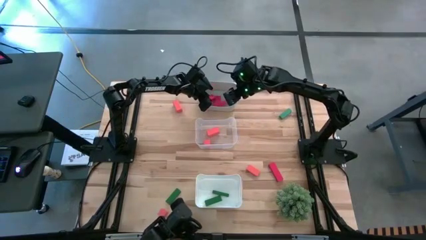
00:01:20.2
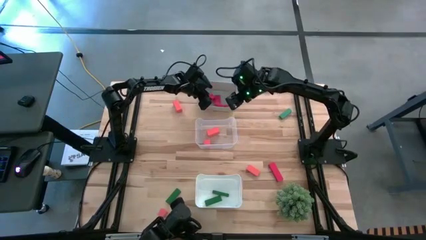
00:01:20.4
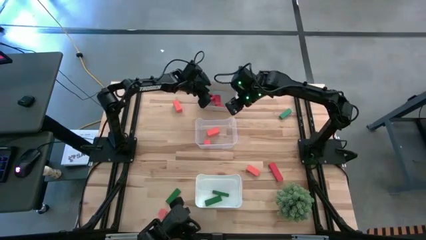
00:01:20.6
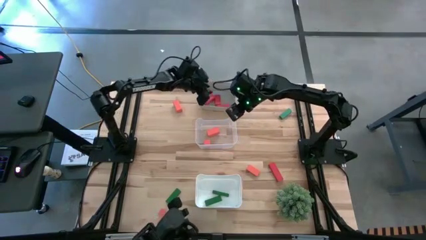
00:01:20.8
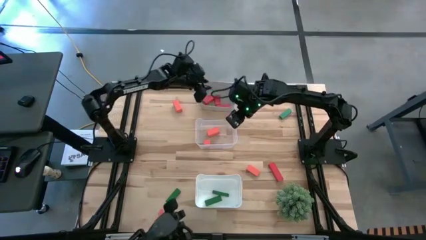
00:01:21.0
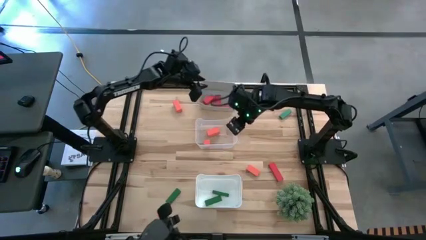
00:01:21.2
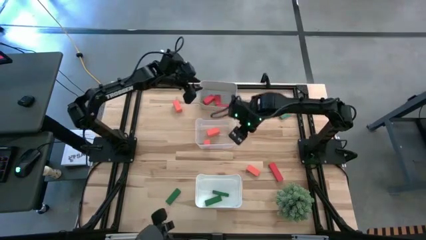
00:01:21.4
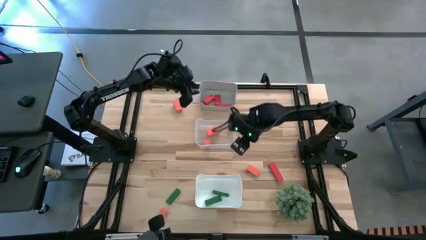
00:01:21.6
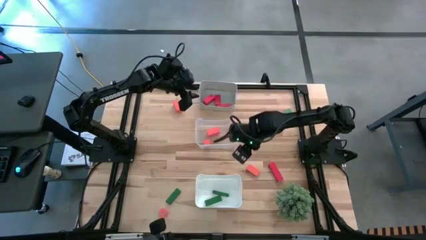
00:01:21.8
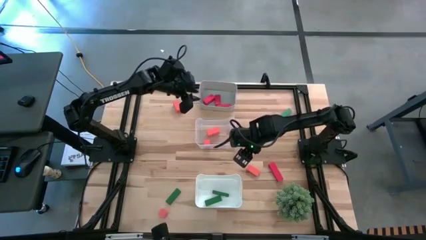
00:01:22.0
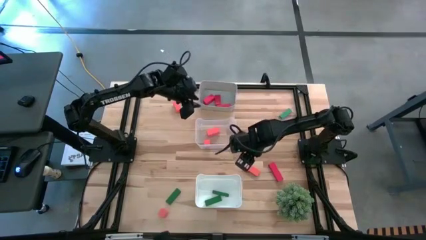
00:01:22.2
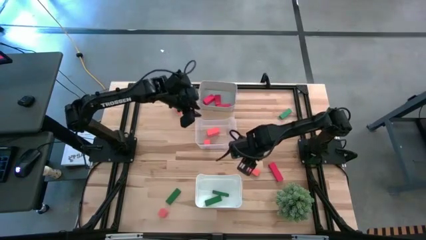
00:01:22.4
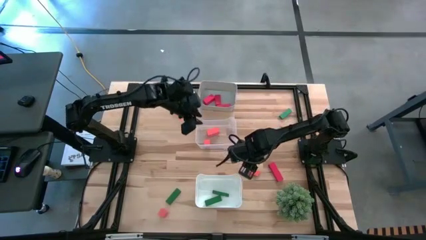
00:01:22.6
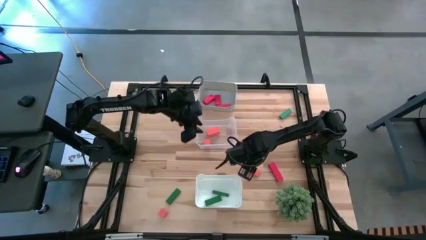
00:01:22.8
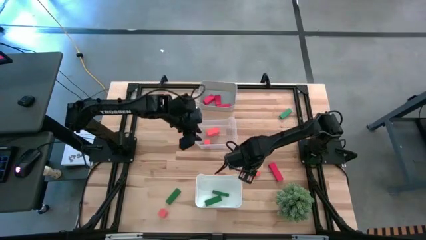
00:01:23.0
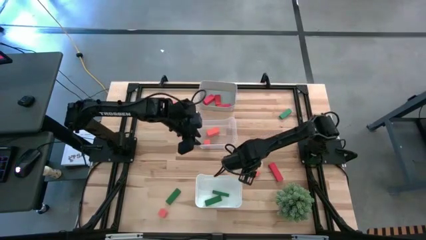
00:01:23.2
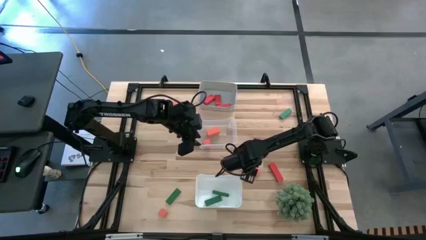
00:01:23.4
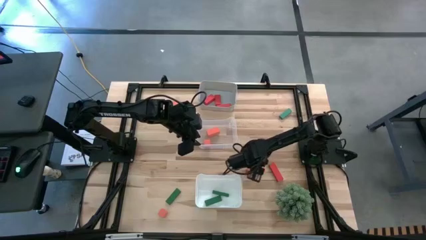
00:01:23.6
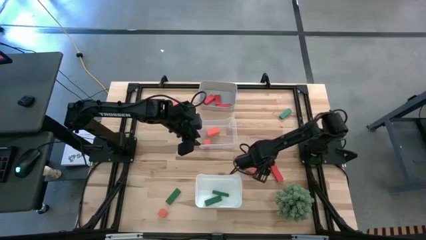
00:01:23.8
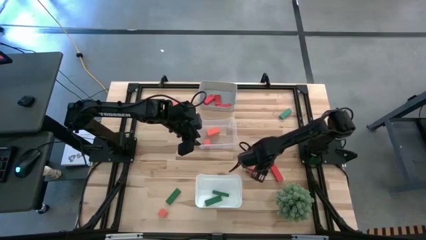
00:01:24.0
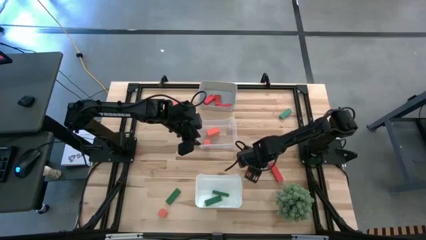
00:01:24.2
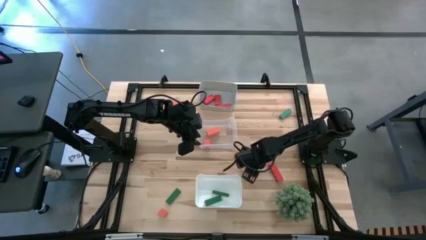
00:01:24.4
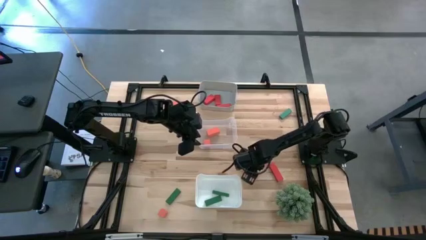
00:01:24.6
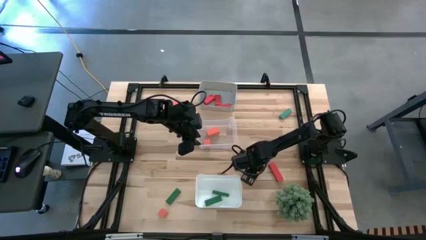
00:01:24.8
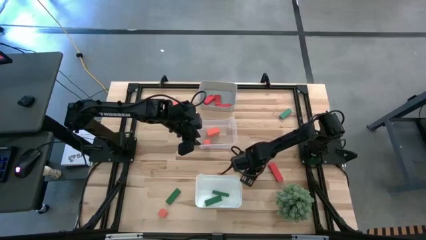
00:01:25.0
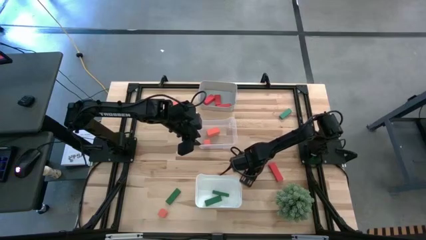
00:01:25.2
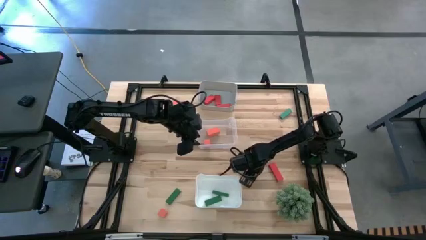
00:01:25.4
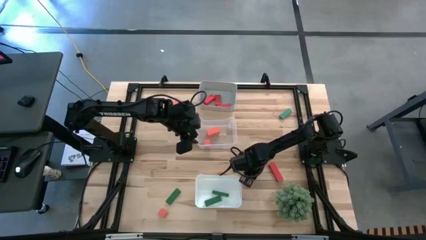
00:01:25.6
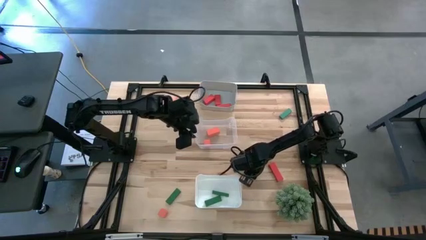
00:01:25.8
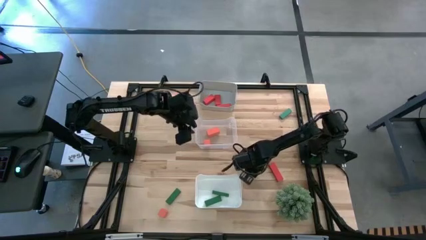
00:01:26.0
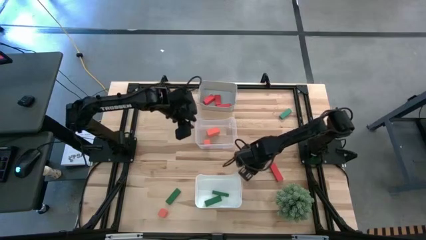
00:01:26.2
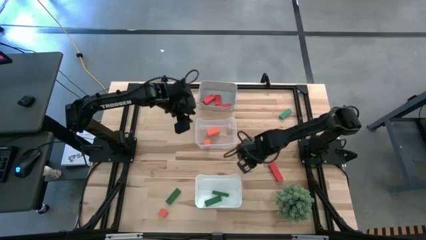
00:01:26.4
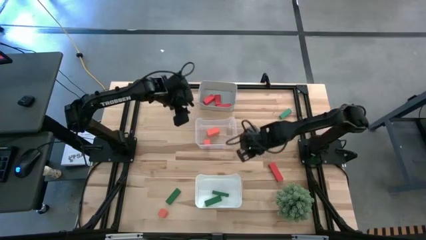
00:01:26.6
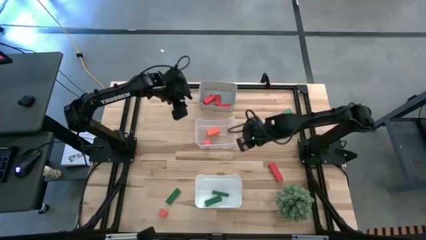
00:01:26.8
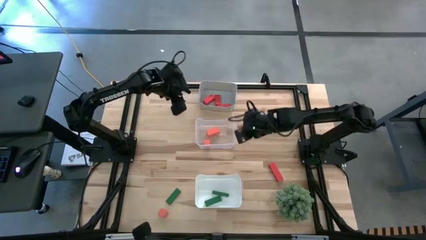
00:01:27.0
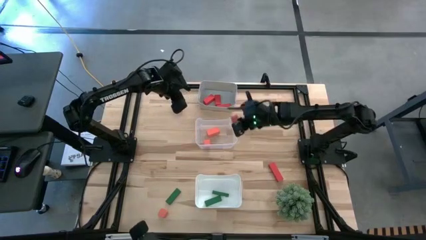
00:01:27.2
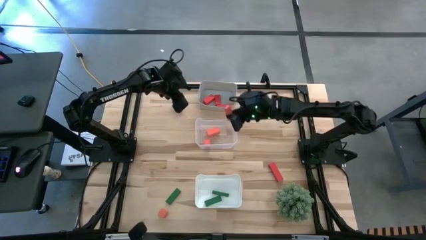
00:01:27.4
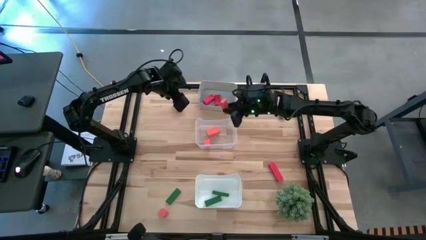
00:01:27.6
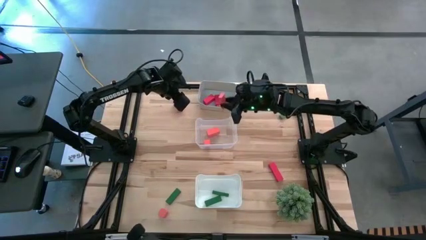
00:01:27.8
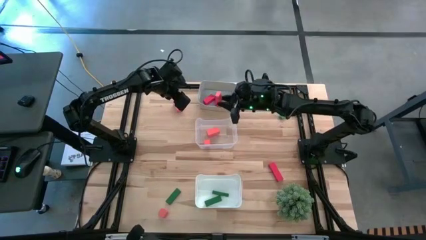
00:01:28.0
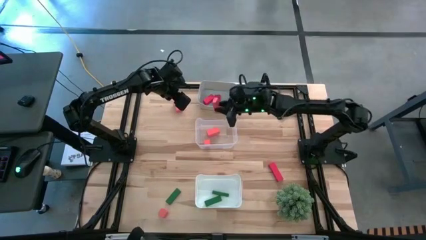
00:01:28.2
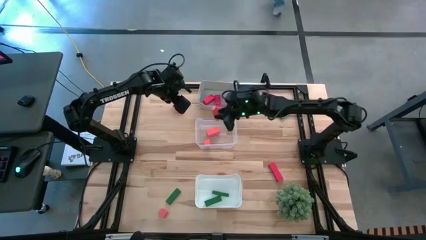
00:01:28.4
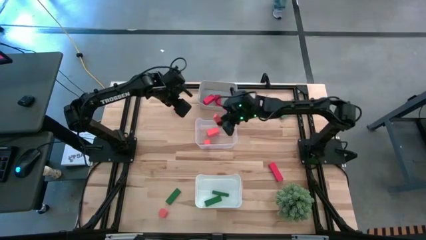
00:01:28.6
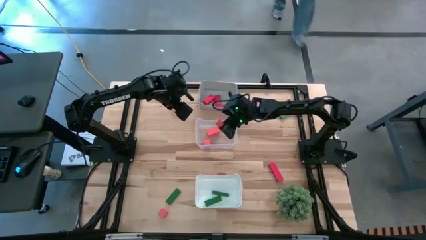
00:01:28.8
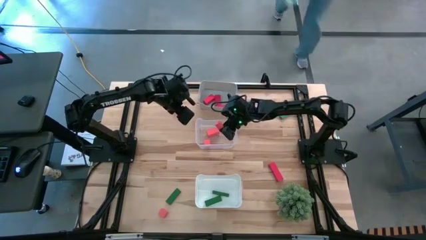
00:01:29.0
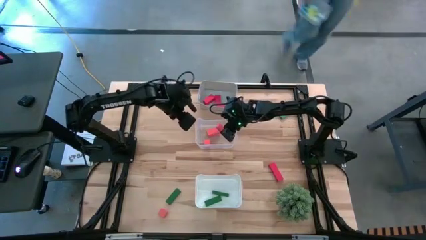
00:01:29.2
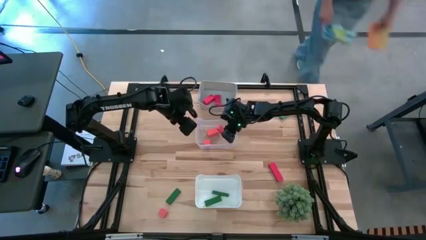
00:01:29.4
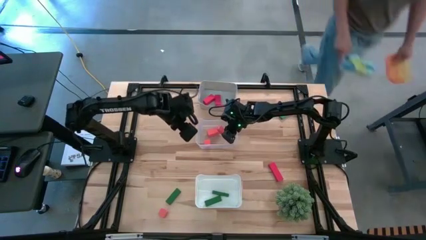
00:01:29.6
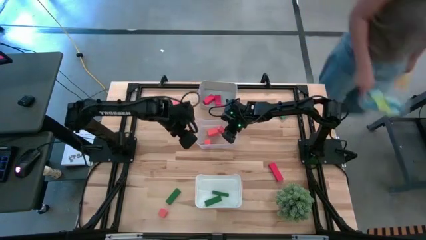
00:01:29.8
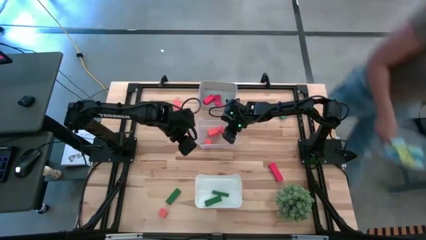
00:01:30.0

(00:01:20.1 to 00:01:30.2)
Task: Sort & place blocks by color
Put the orange block into the transparent bin

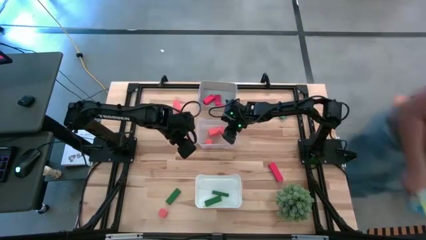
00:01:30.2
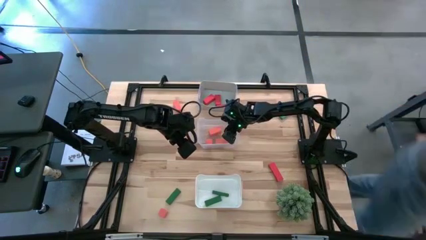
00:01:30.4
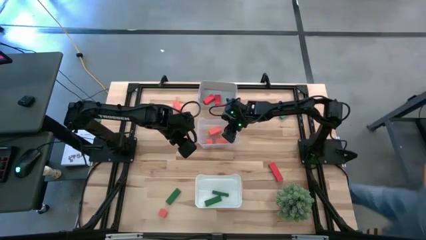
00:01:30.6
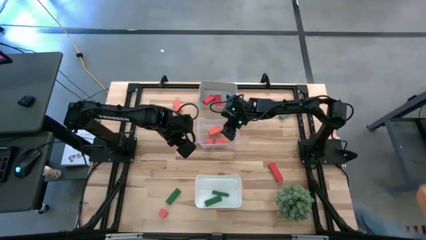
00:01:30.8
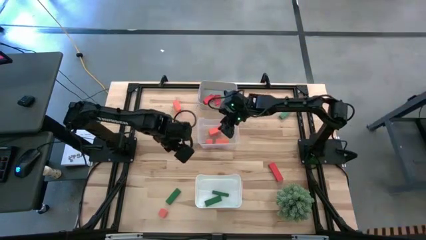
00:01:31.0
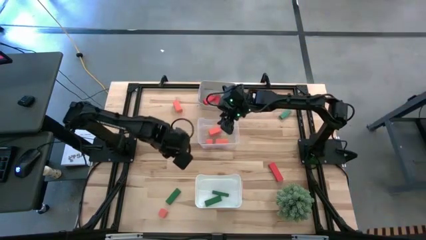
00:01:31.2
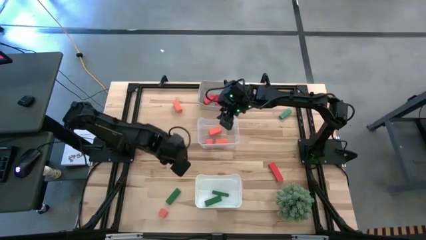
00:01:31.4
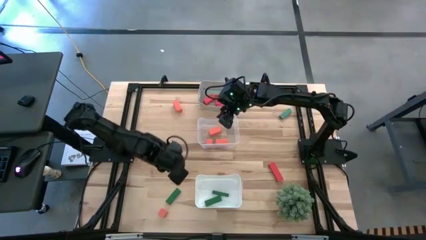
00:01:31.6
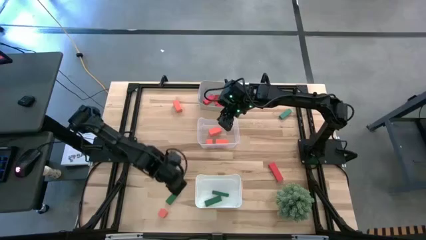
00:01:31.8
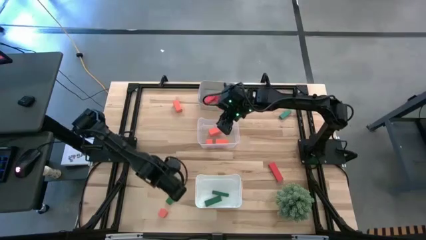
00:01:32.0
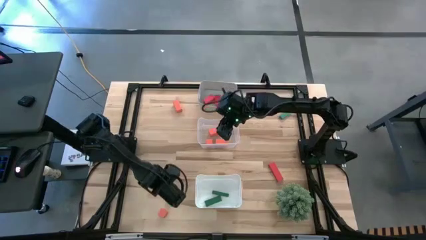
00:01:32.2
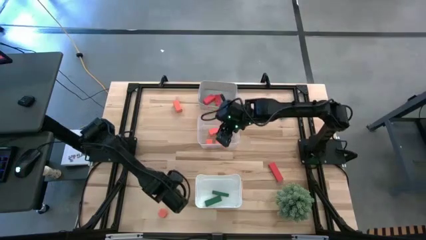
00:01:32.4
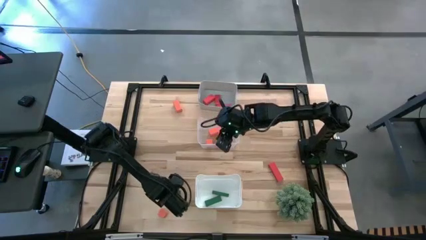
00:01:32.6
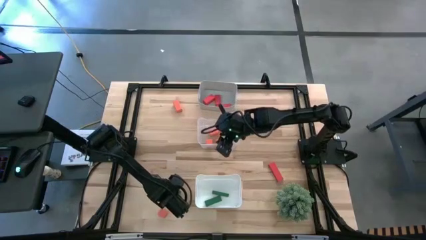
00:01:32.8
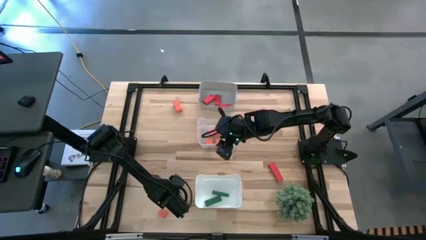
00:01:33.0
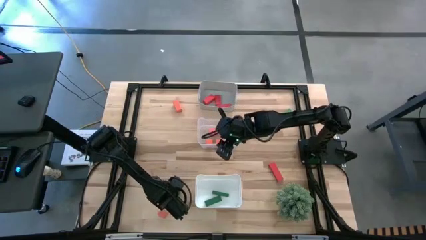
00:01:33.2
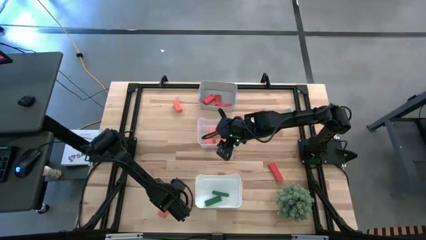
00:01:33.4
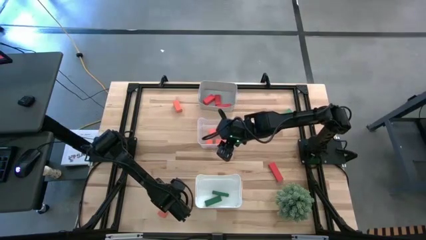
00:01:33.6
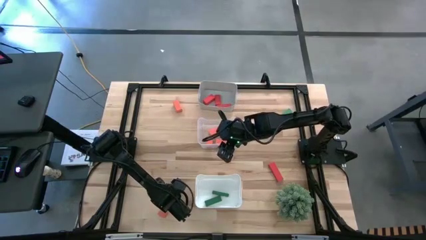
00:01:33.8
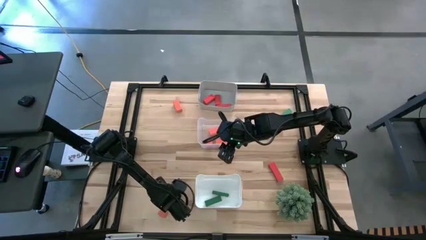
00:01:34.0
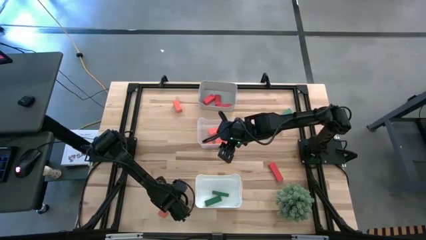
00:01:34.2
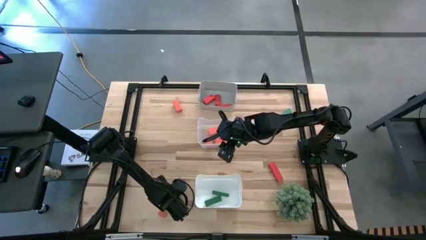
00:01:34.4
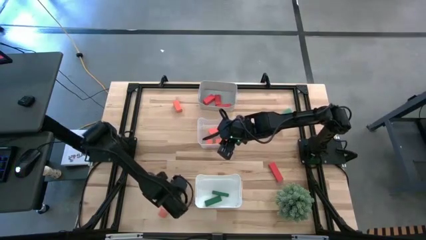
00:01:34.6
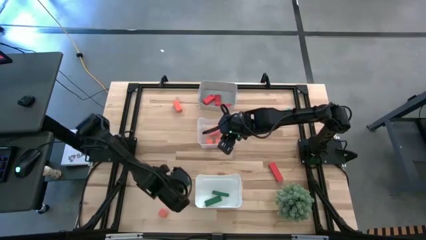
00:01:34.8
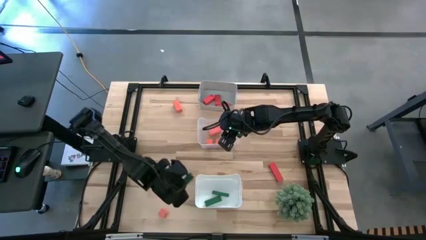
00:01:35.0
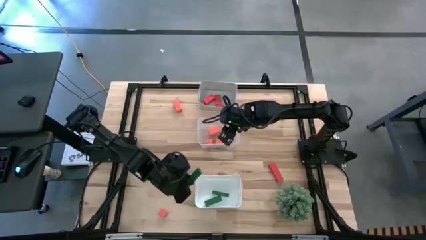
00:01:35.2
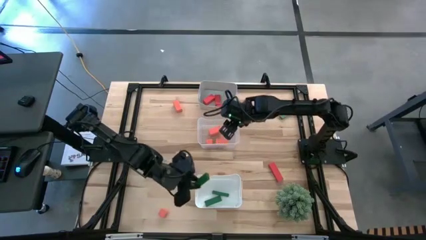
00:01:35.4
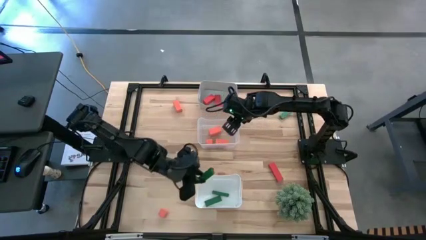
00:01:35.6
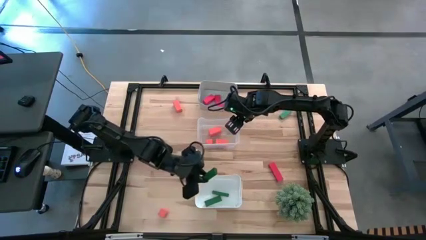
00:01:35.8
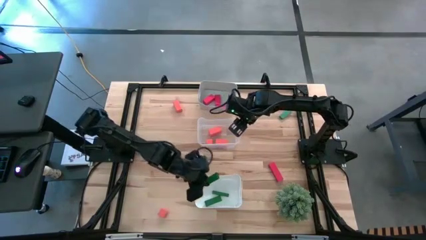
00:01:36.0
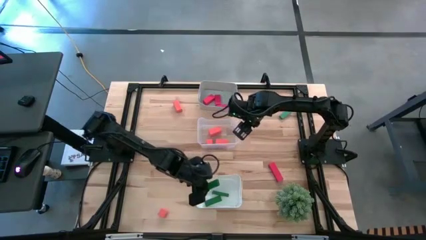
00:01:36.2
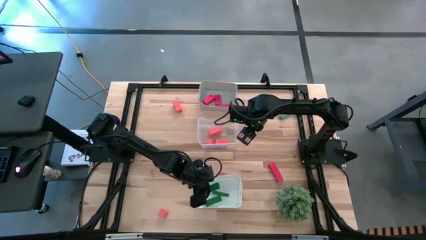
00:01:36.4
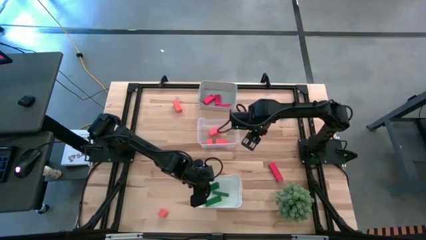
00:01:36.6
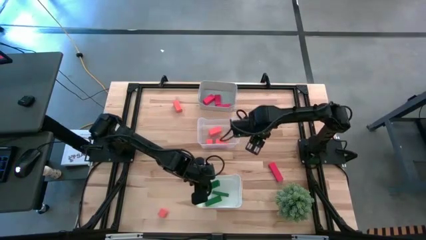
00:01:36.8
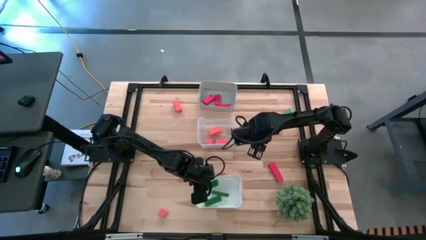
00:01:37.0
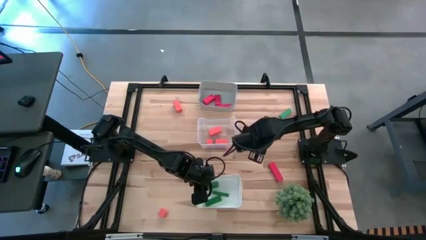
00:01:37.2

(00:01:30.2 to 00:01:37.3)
Put the bottom green block into the white bin
